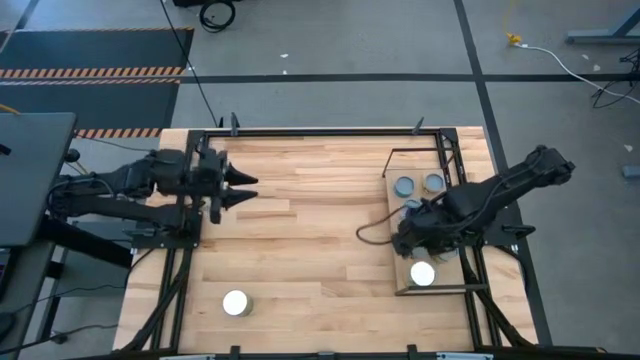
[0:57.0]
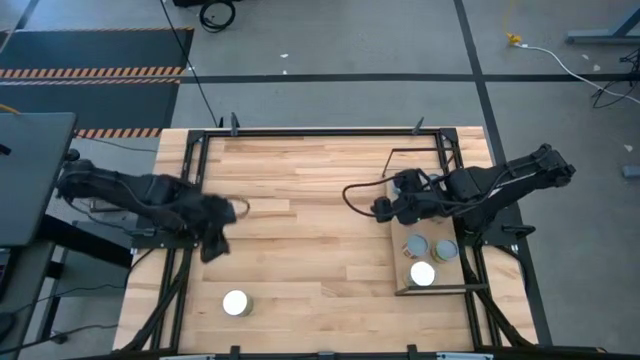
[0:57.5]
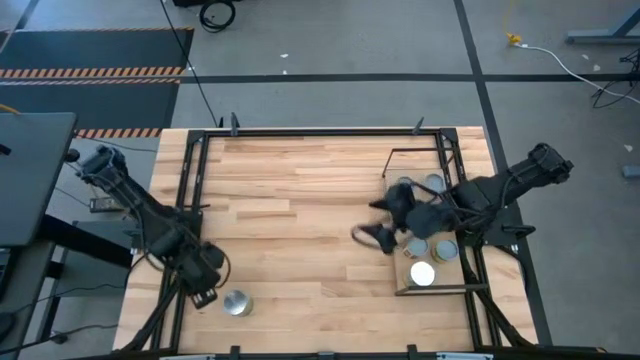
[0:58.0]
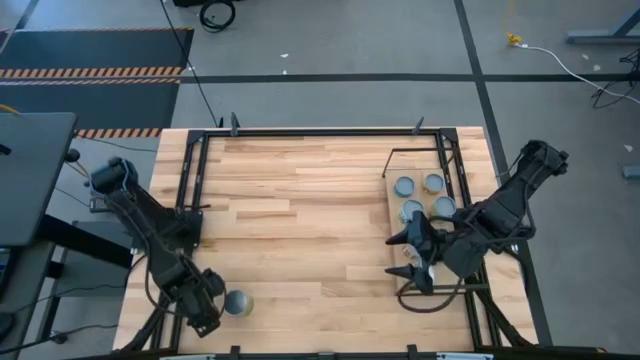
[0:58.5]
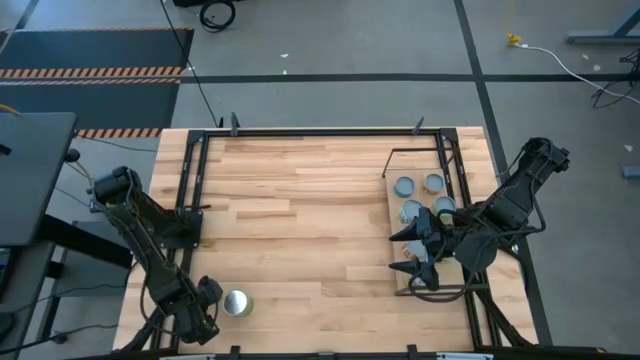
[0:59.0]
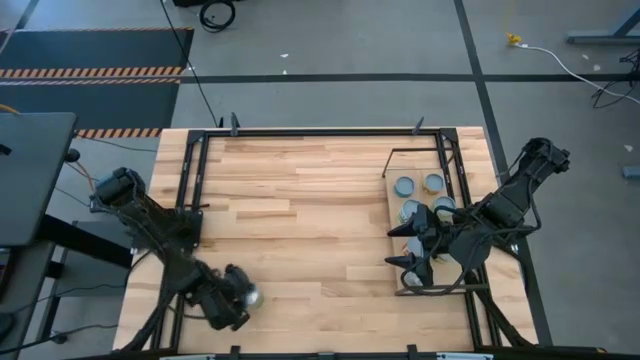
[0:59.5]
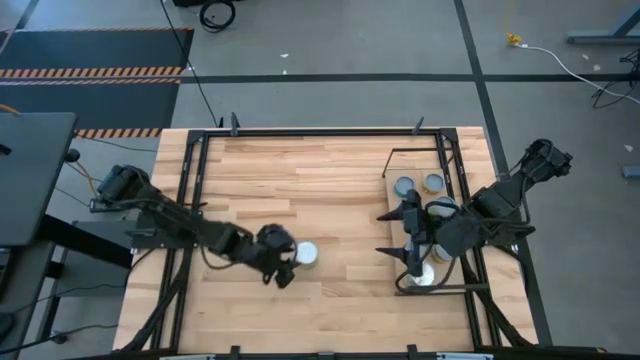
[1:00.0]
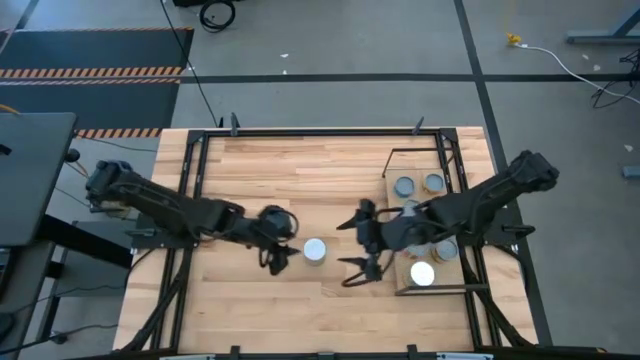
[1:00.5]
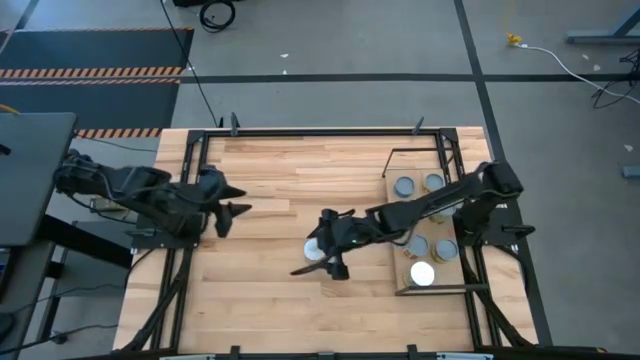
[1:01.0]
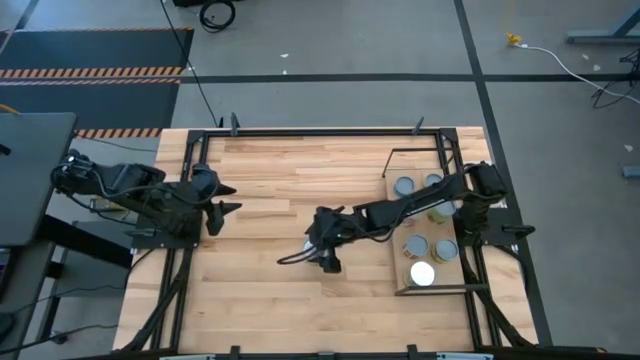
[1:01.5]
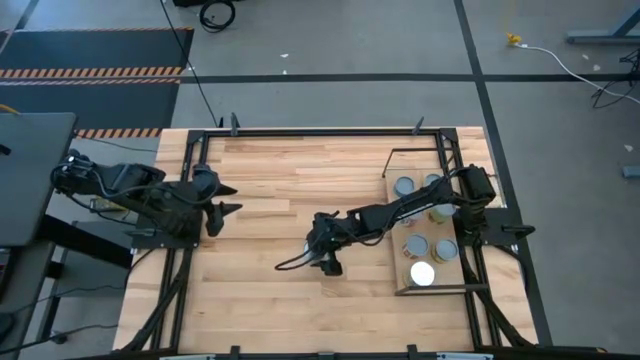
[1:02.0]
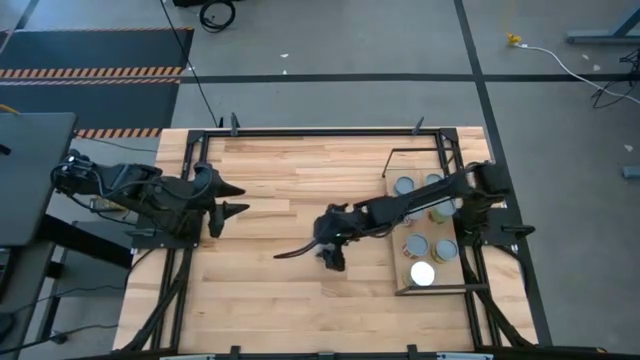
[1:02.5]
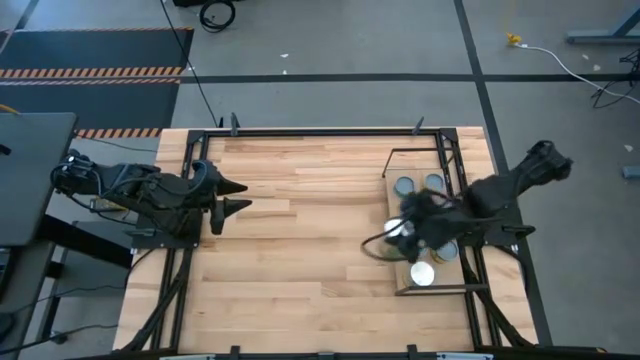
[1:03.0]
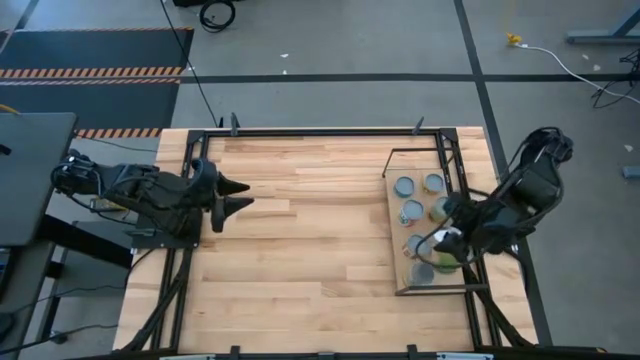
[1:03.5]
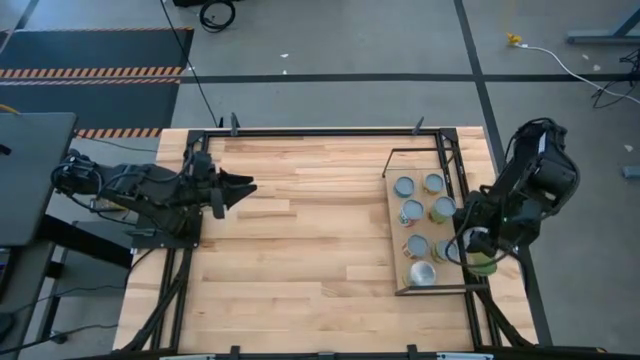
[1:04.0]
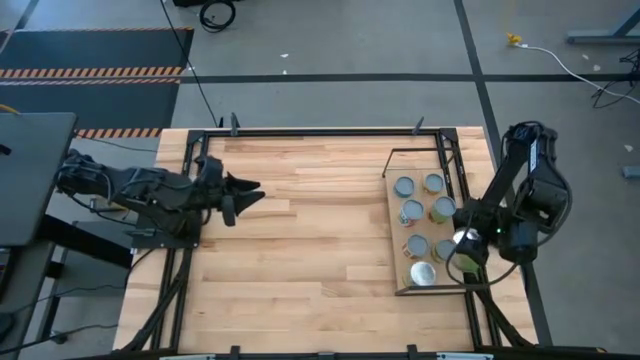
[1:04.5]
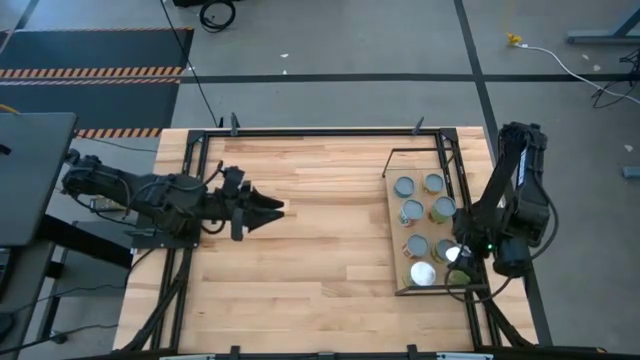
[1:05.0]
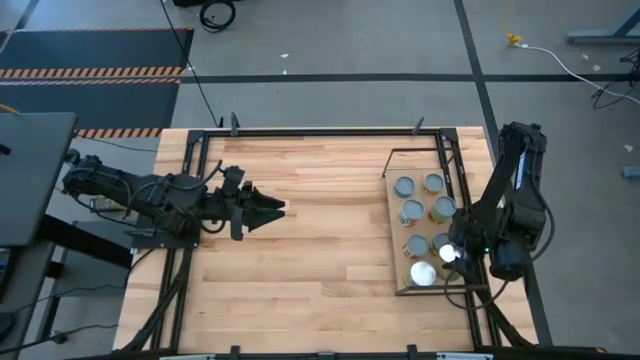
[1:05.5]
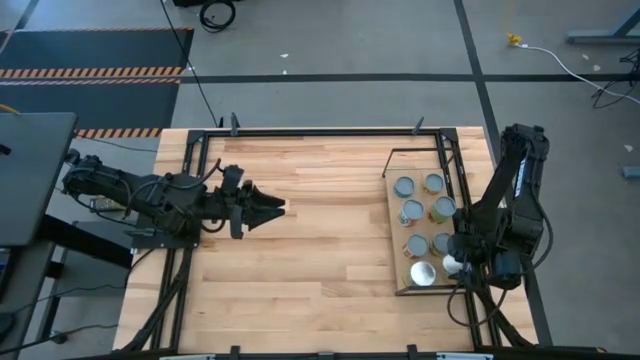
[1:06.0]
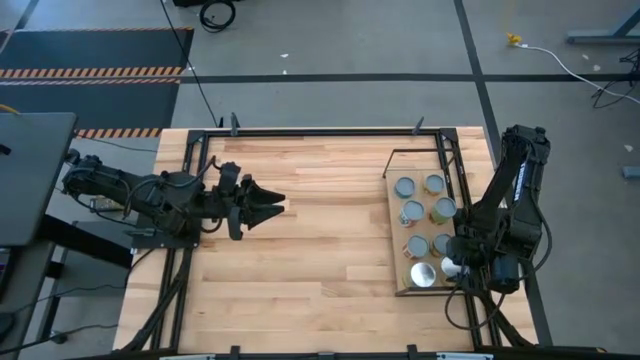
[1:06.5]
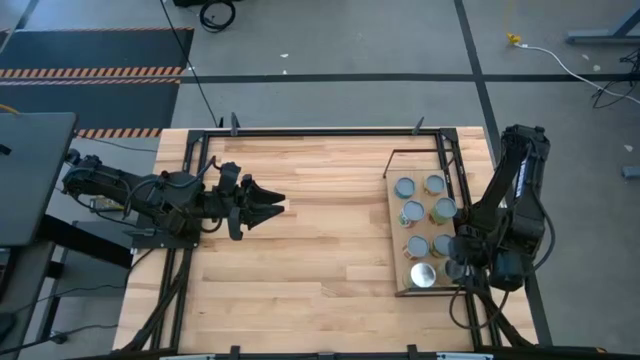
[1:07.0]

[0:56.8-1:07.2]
Task: Pick and place cans onto a shelf
Put the canned oranges can on the shelf

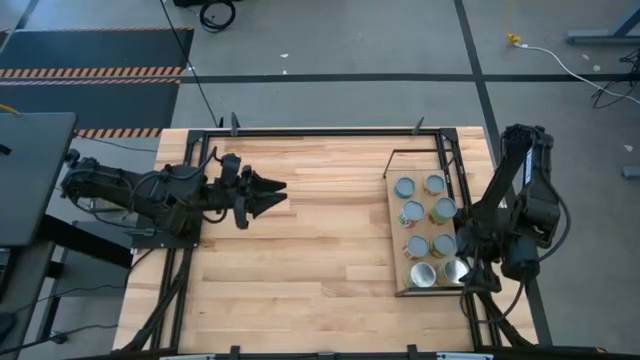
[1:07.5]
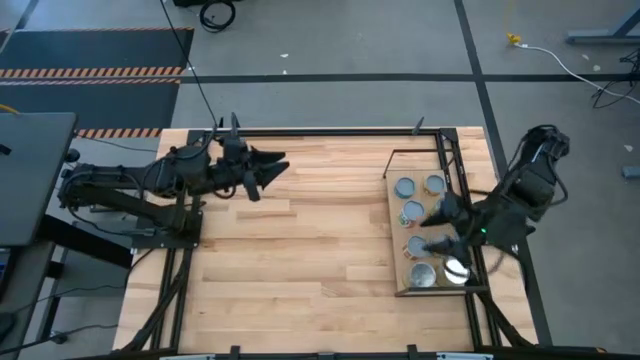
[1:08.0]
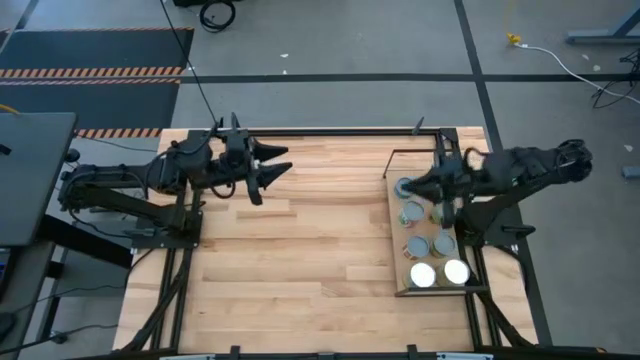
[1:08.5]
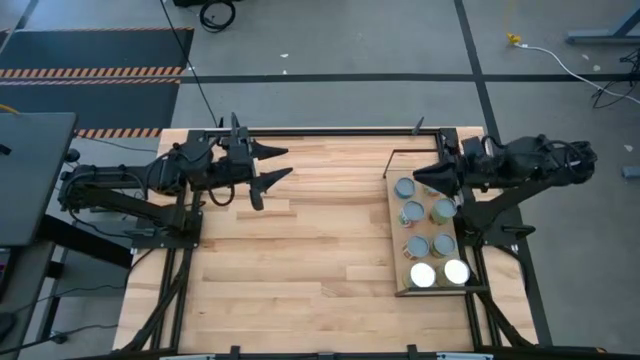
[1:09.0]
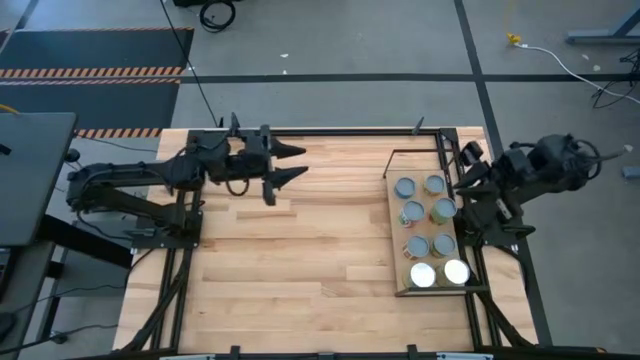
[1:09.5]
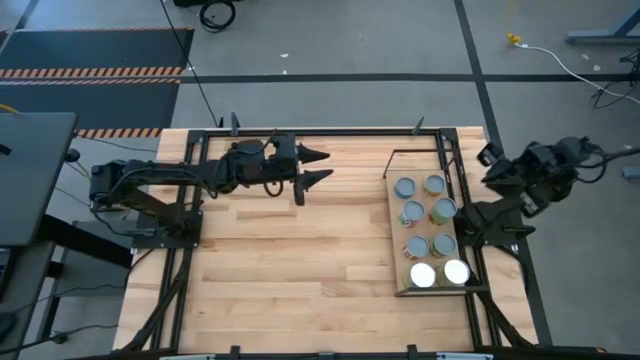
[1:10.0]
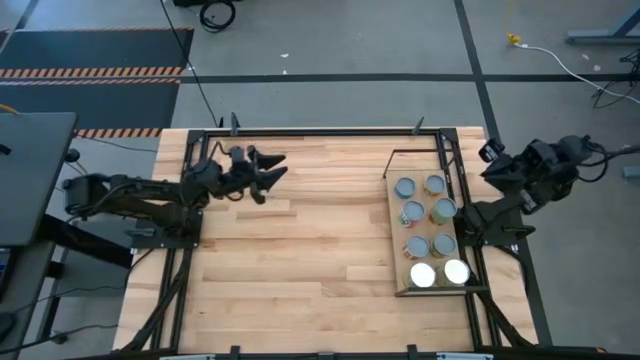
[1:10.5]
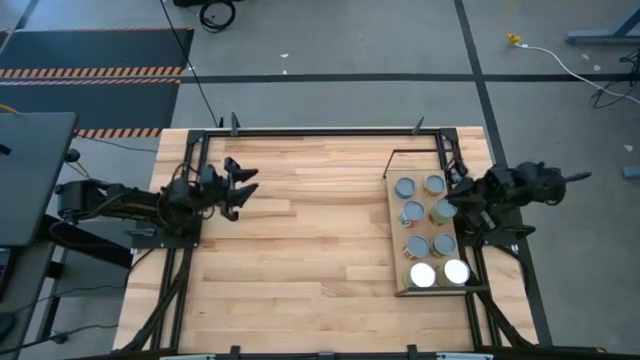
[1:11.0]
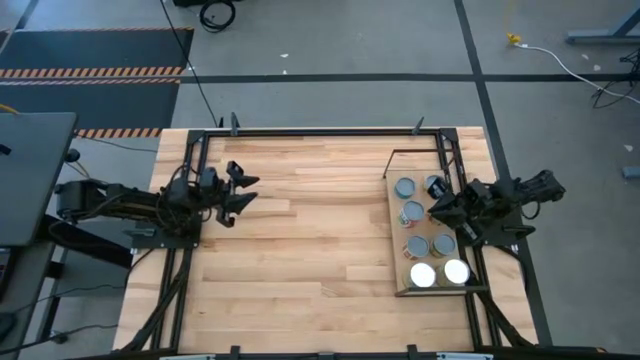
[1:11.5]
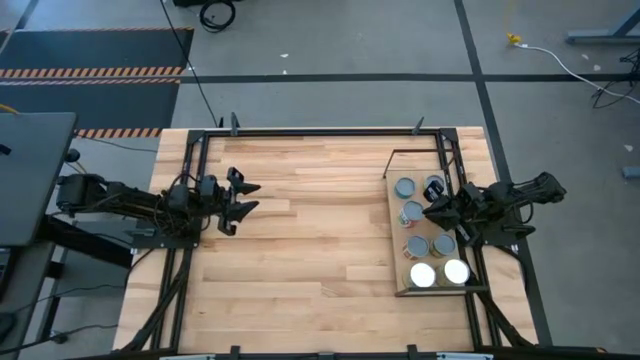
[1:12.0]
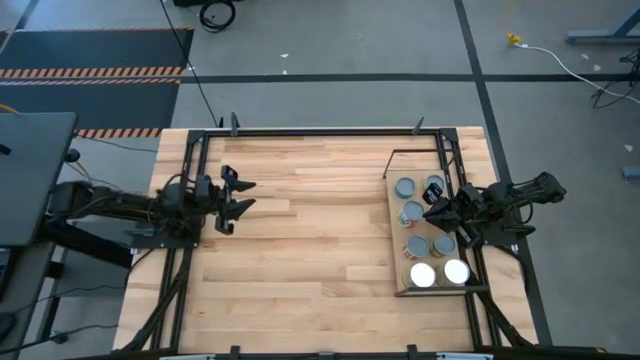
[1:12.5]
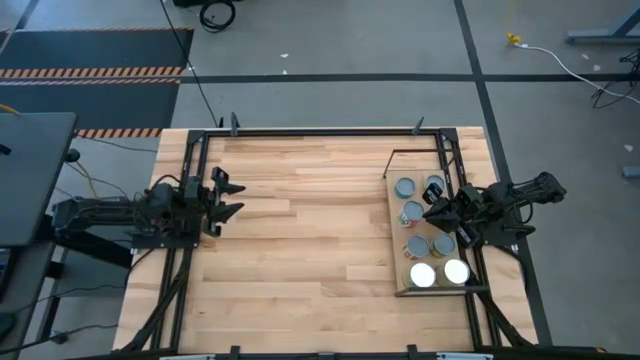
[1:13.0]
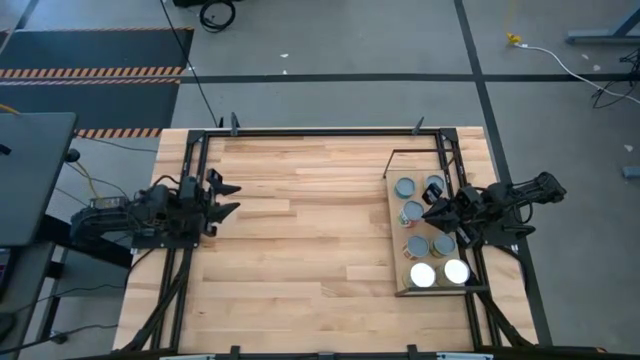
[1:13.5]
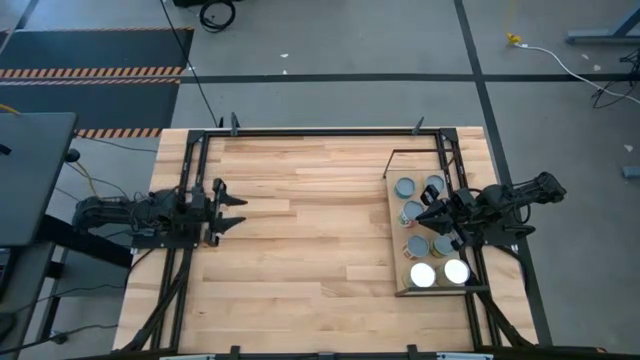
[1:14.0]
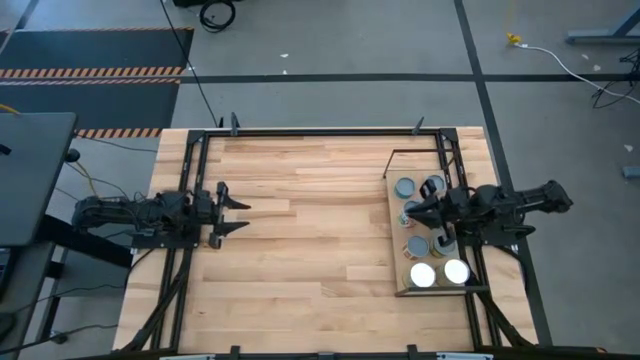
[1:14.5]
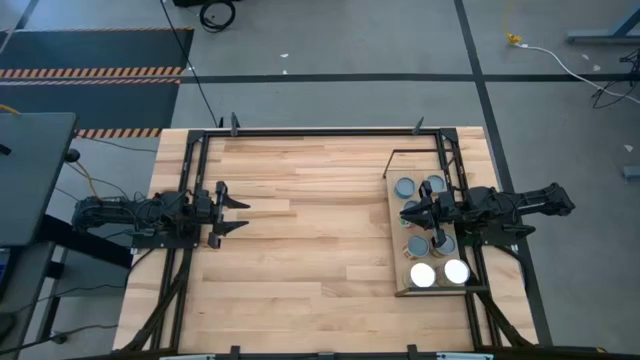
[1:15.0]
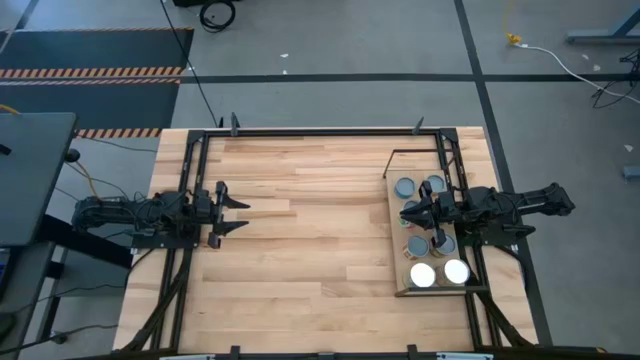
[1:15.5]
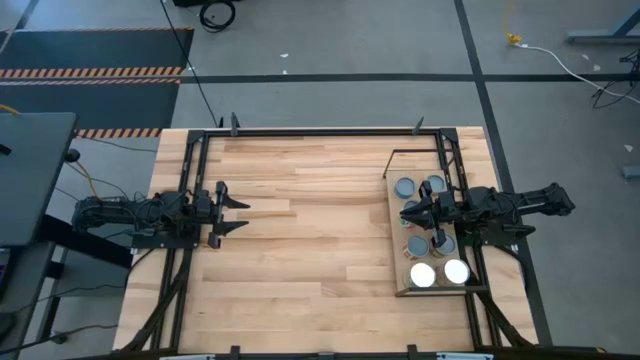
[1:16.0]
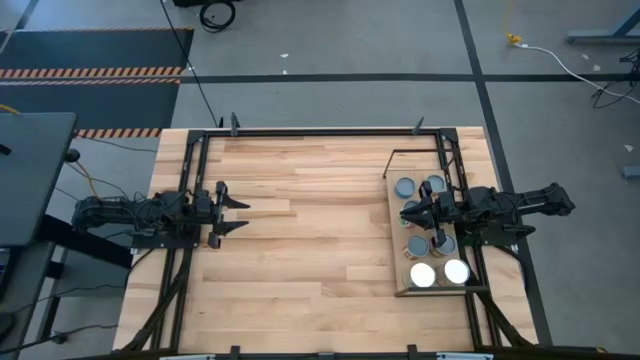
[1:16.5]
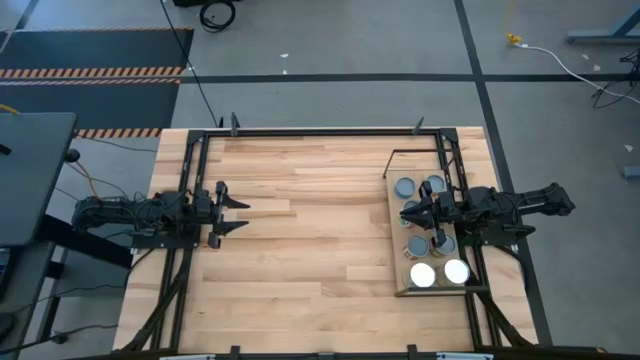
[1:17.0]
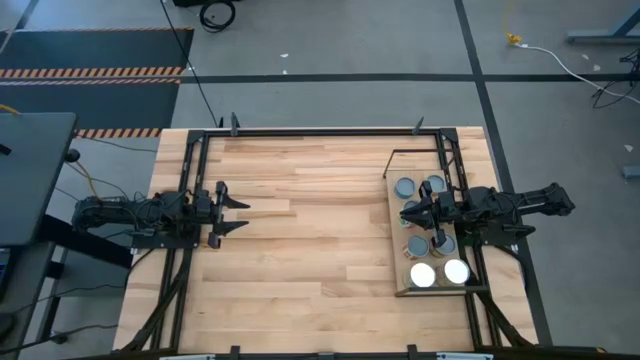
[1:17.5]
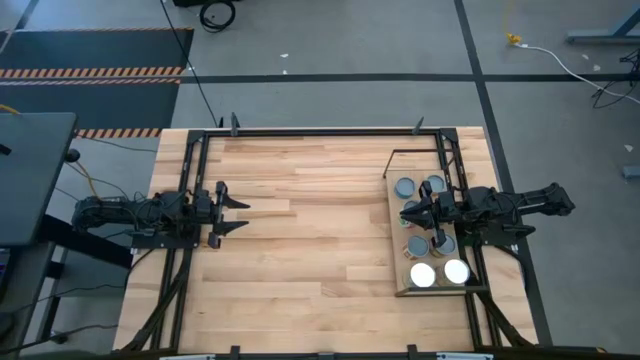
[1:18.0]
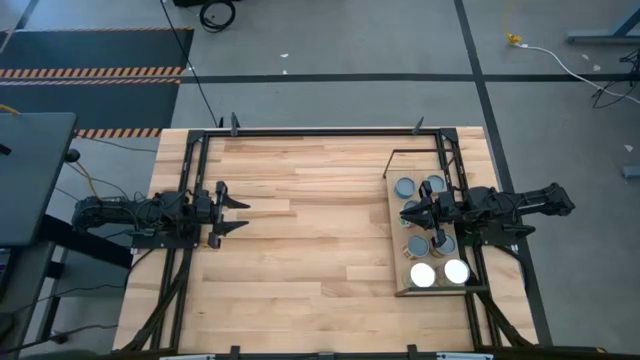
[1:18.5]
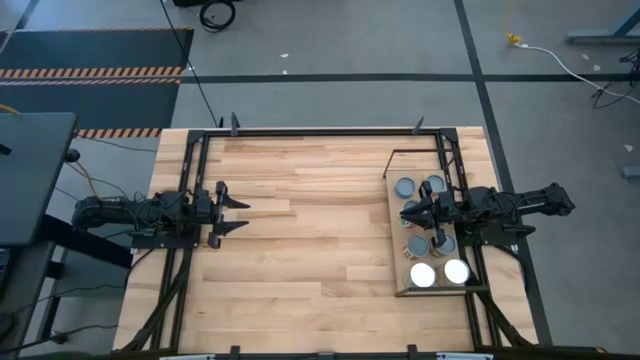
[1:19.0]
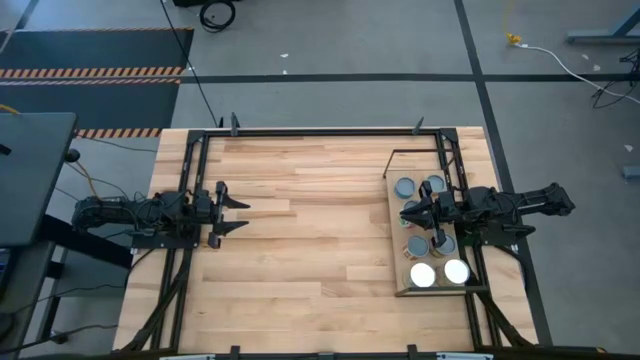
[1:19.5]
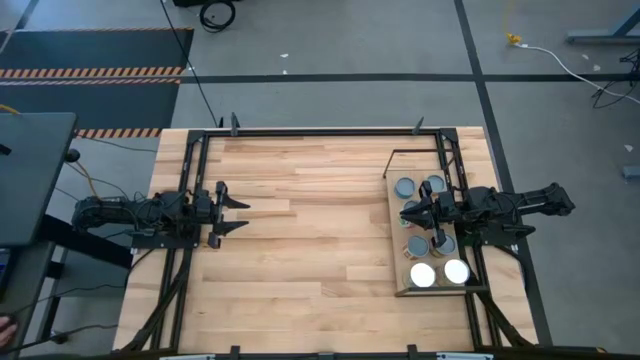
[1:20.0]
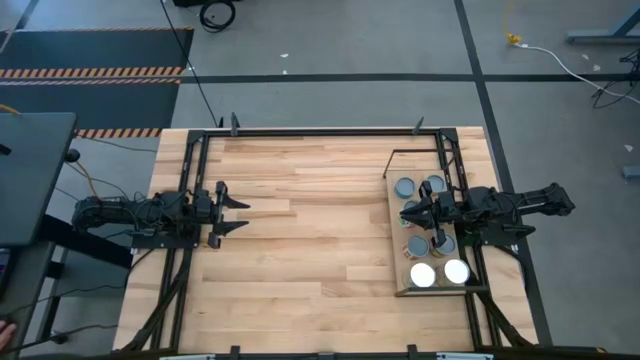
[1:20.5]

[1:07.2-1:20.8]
Return to Home Position
